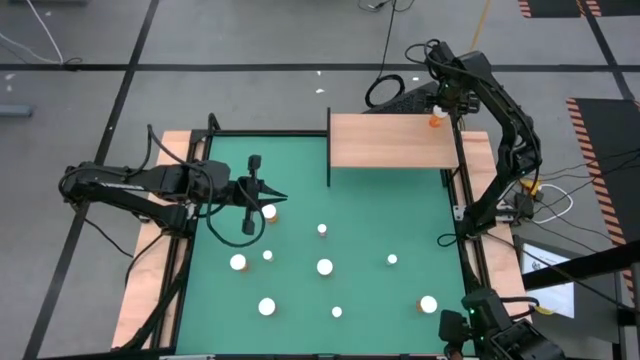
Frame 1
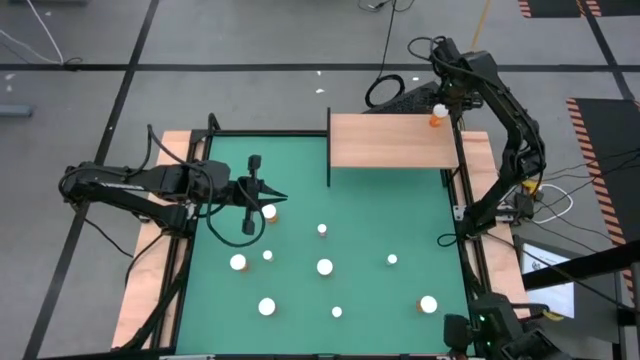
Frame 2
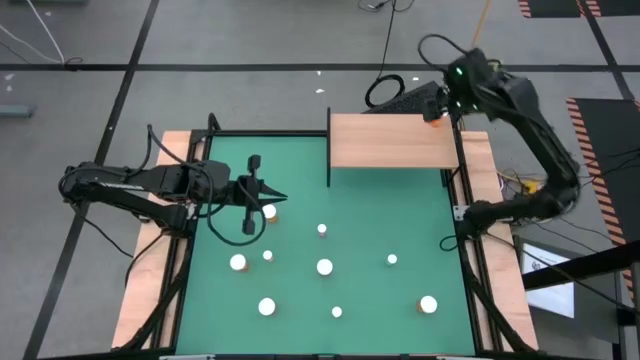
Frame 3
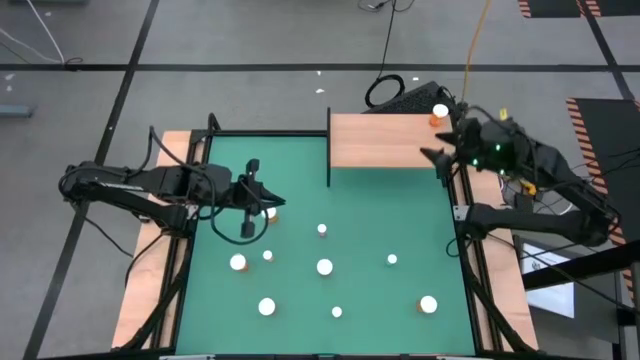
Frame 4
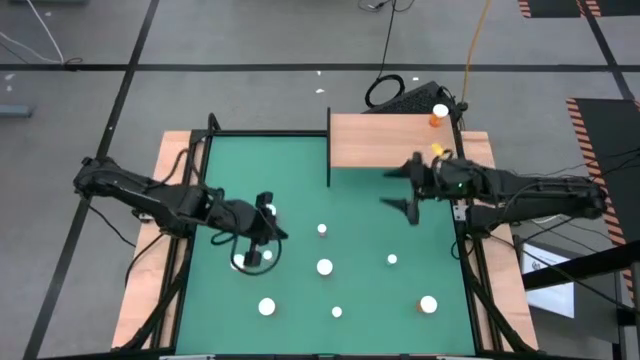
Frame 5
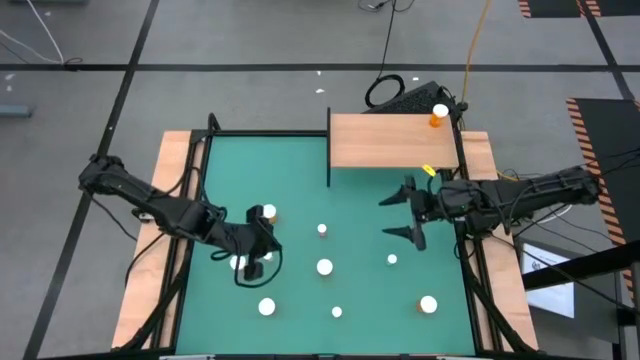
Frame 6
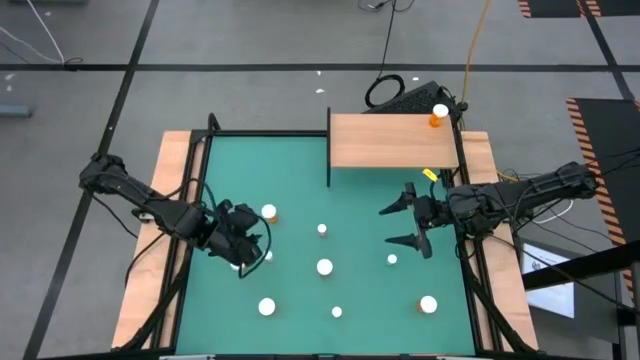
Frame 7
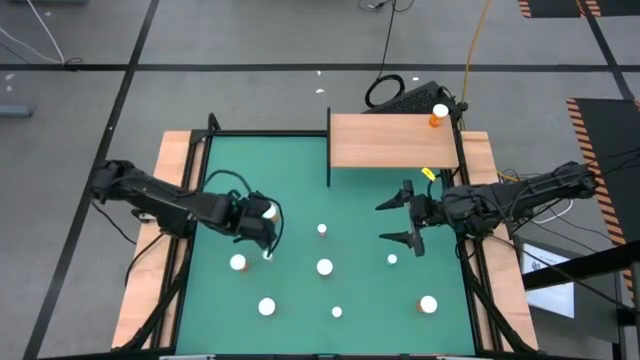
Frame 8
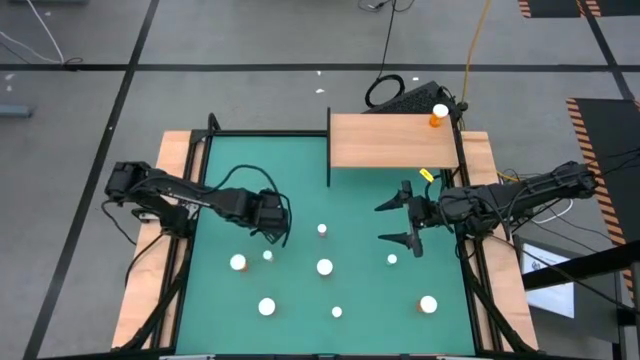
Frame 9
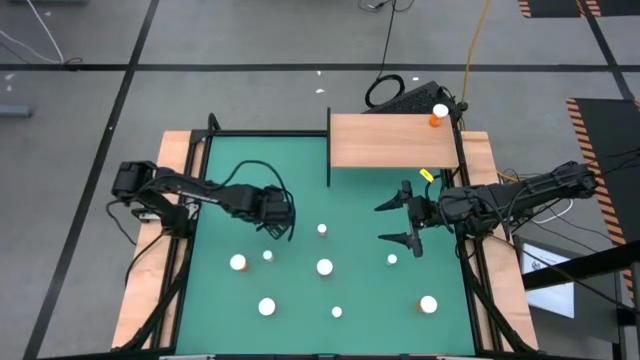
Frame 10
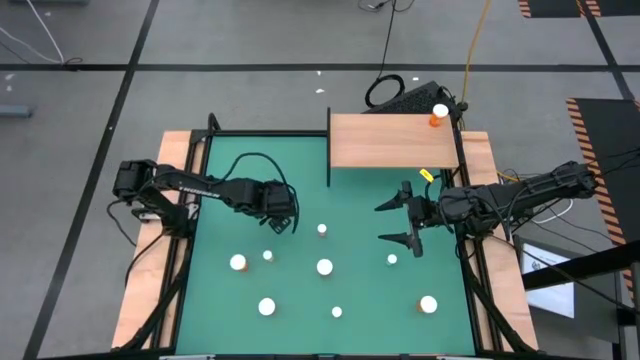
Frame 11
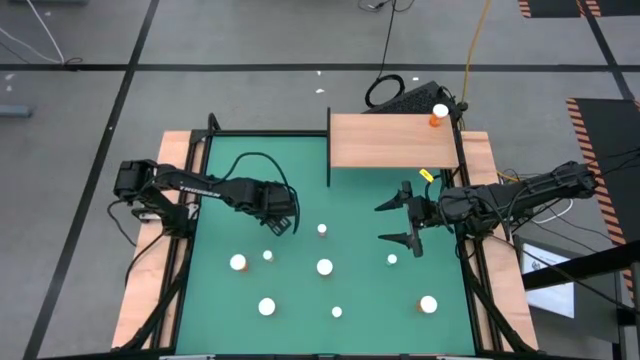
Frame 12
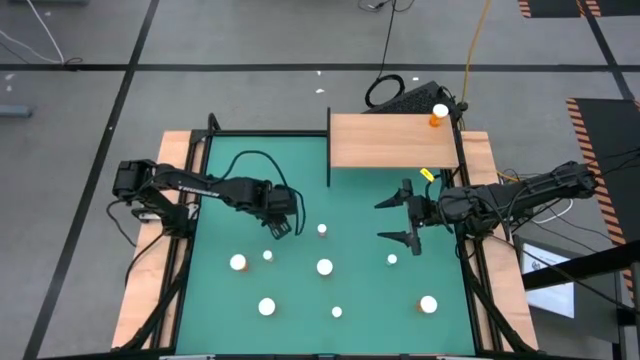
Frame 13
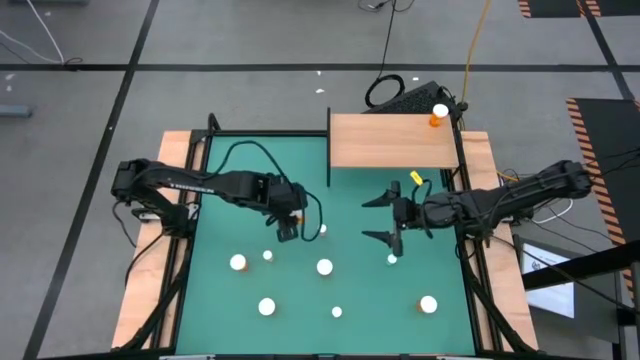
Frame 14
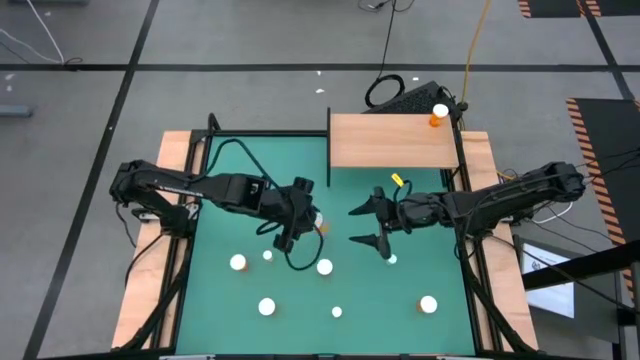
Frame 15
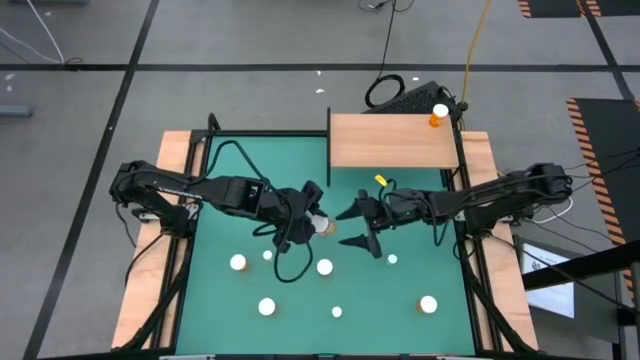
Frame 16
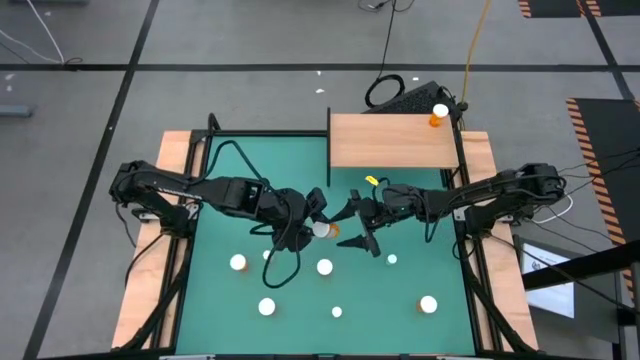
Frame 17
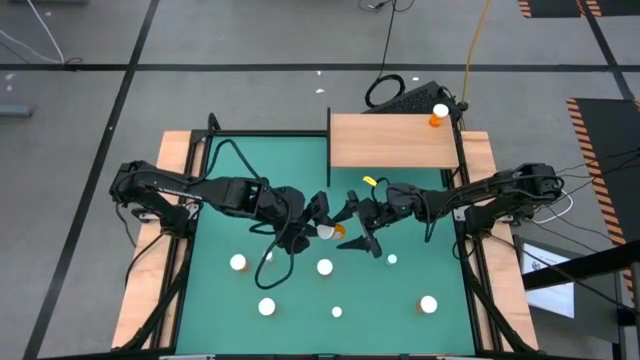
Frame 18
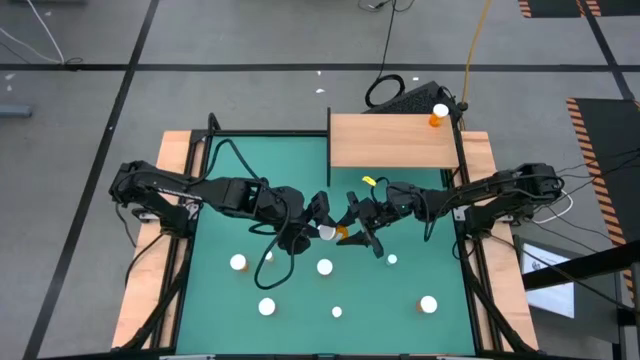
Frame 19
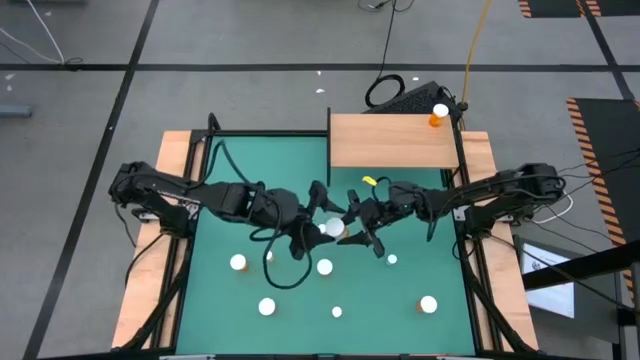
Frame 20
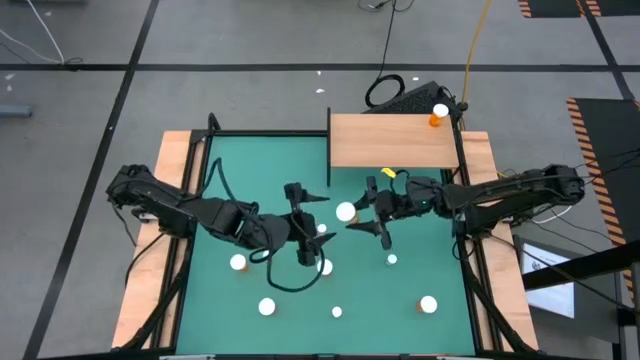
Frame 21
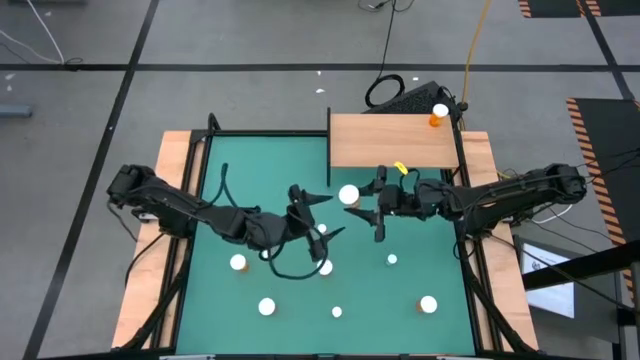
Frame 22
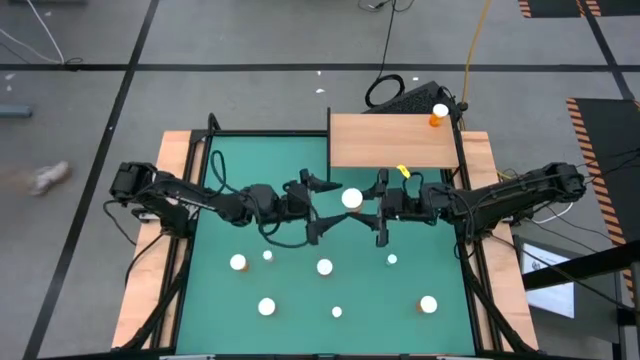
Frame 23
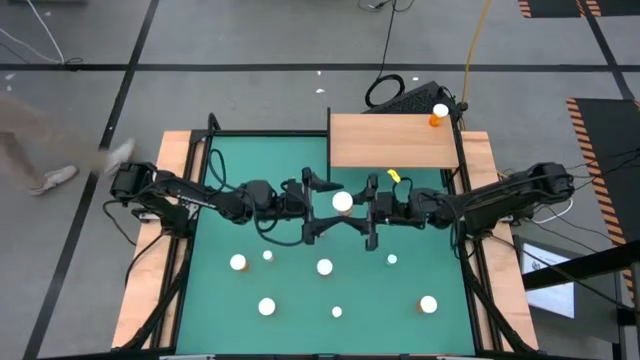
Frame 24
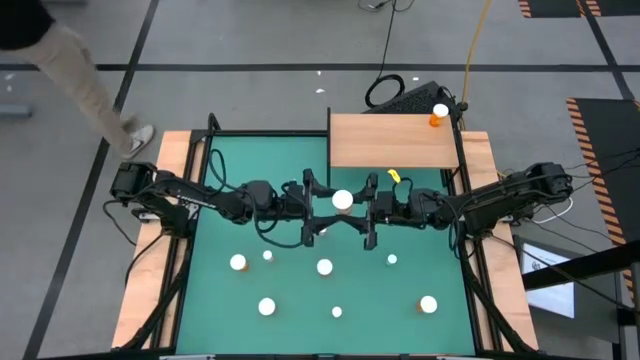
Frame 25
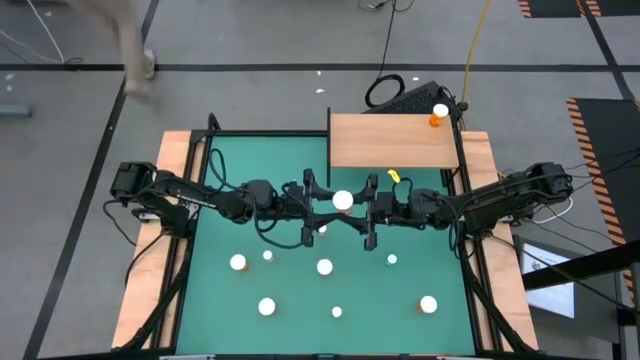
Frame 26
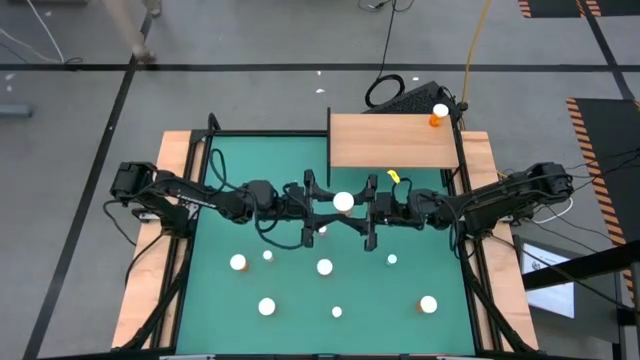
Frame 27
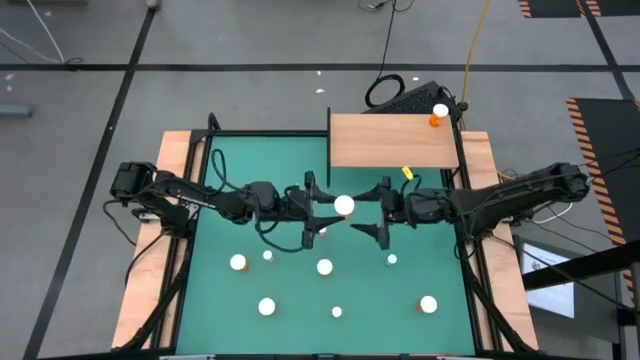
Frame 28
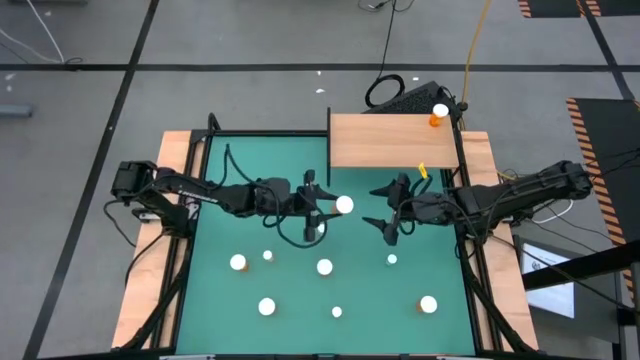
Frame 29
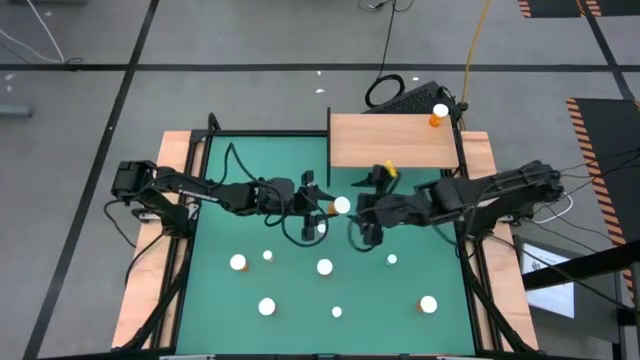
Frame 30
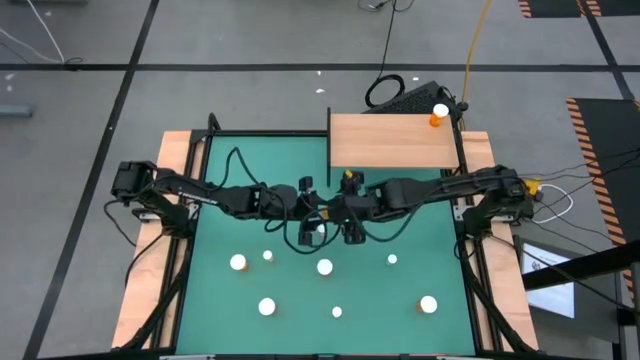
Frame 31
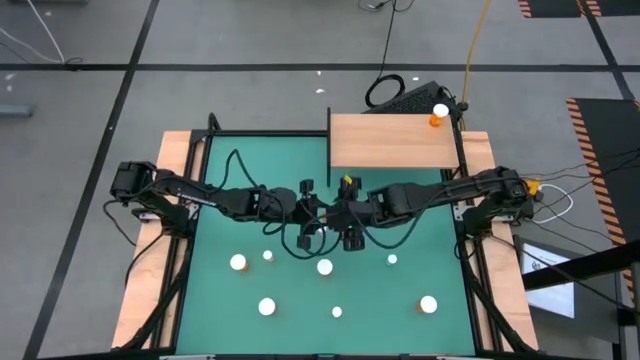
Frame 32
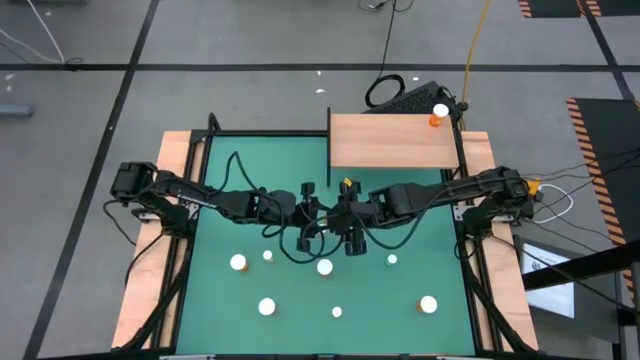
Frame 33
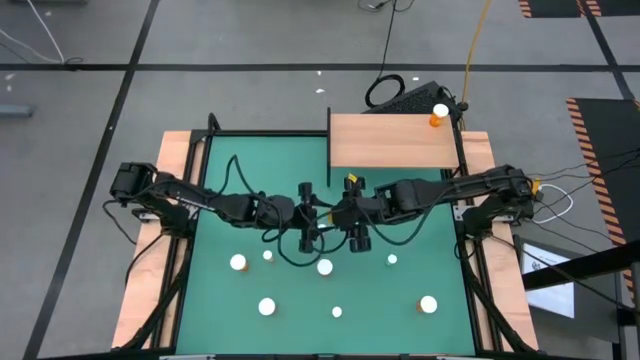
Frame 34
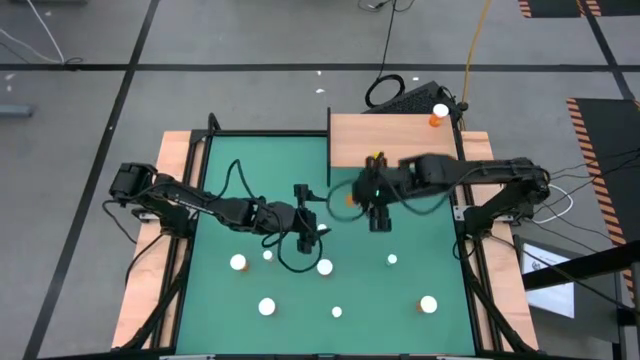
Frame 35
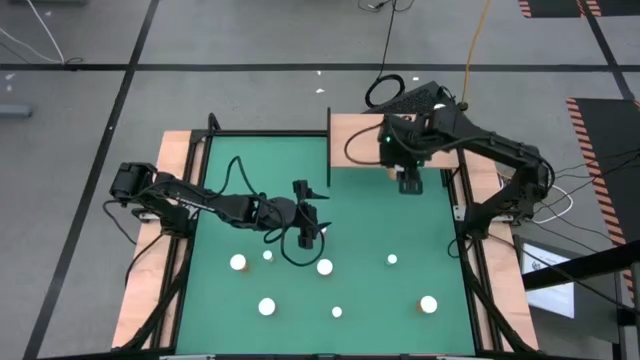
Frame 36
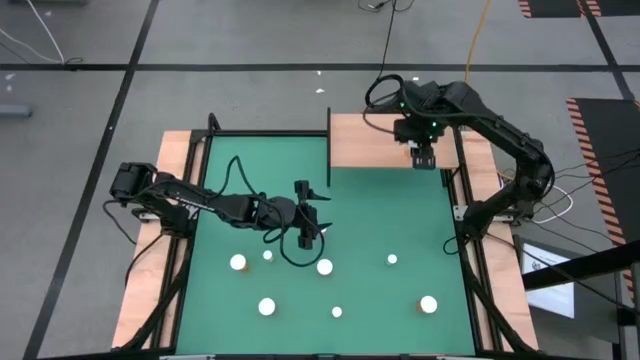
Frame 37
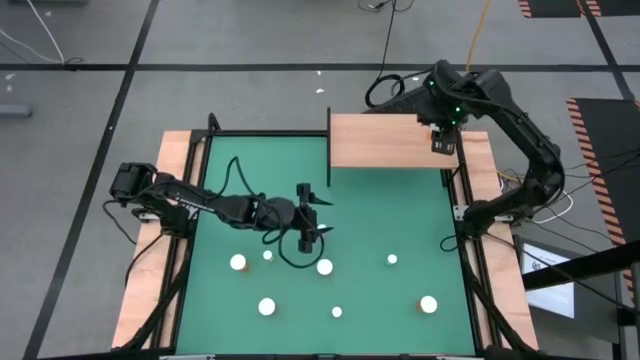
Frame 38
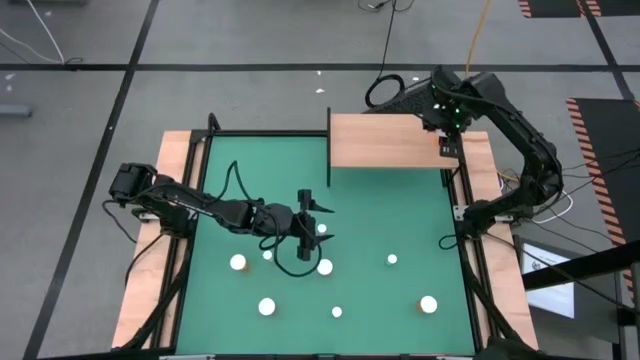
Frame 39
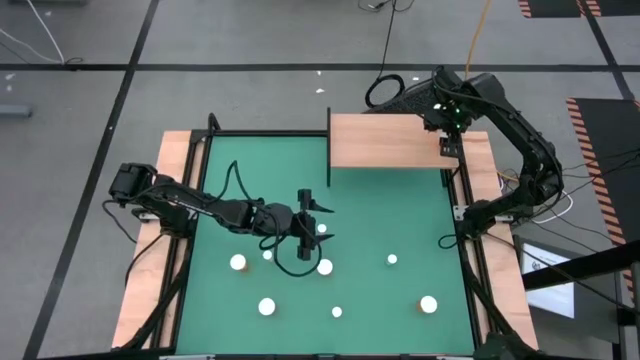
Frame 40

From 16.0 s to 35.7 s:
Task: Pick and place medicine bottles onto shelf by color
Put the orange pill bottle on the shelf

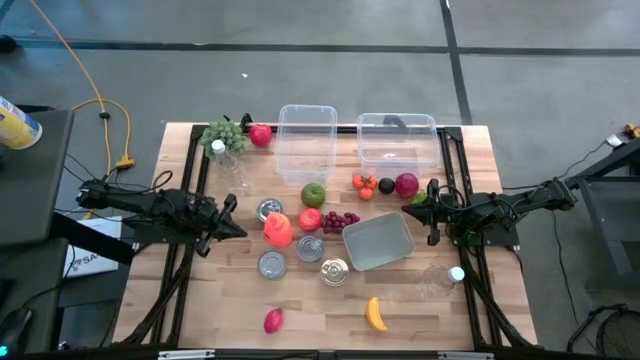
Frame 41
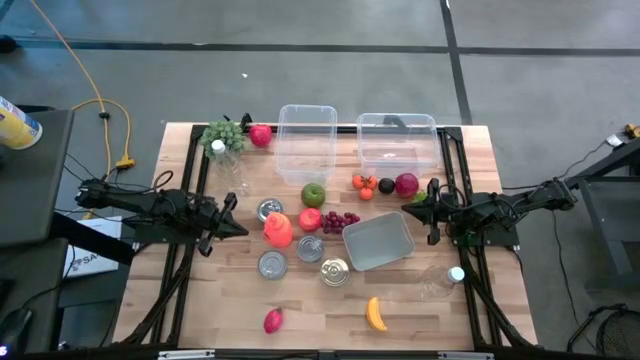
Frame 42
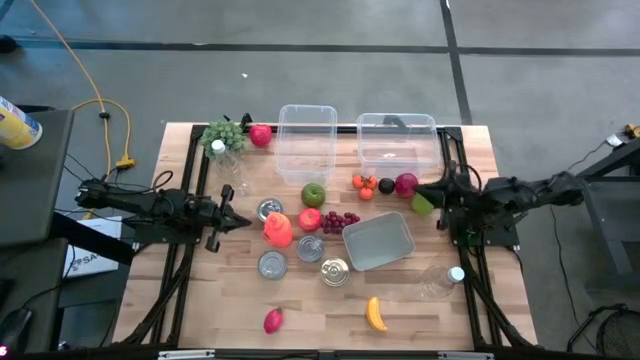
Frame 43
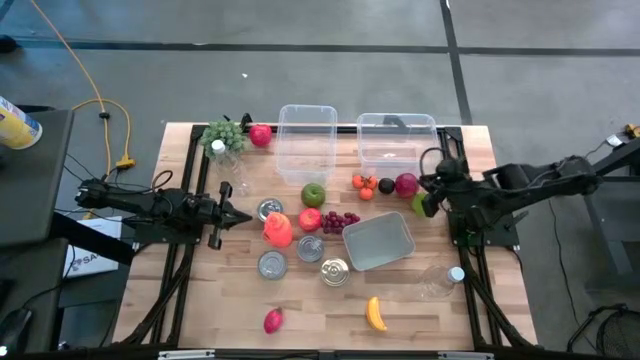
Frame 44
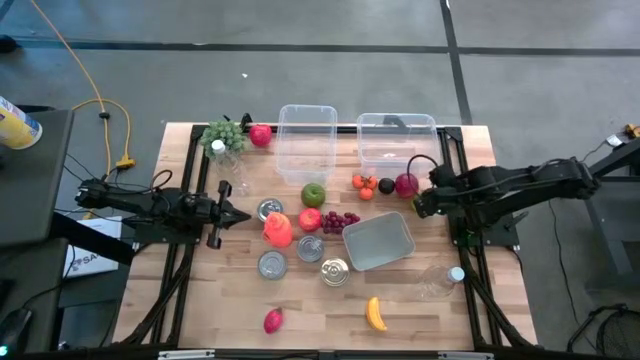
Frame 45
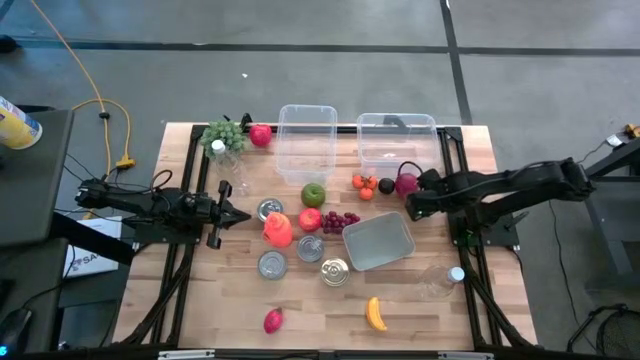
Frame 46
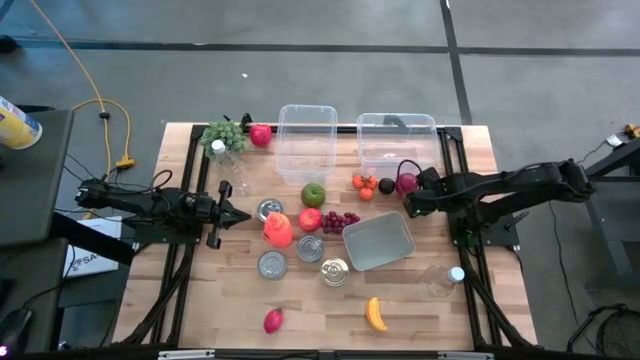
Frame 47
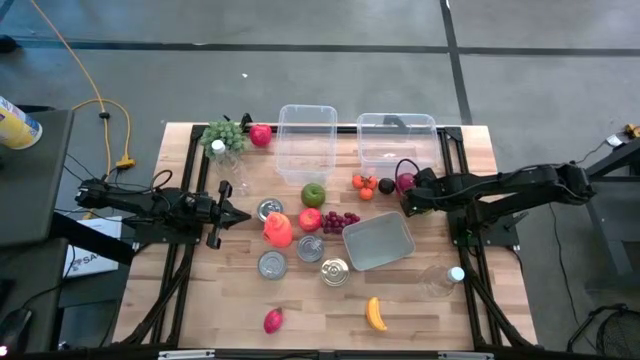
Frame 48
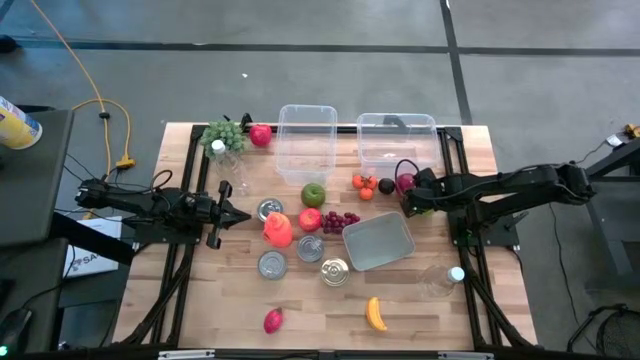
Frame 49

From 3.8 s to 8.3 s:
Task: Pick & Place Food Item
Put the pear into the right transparent bin
